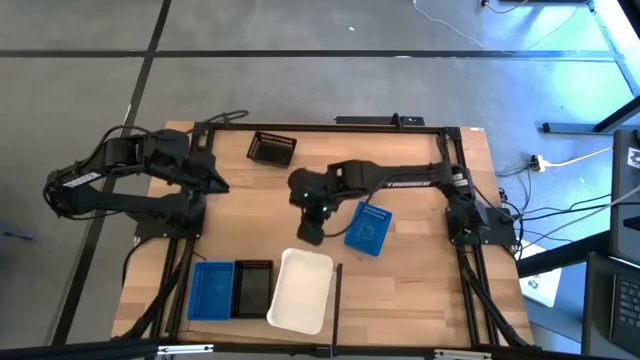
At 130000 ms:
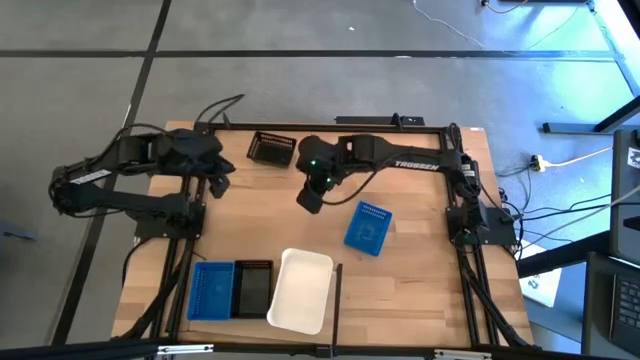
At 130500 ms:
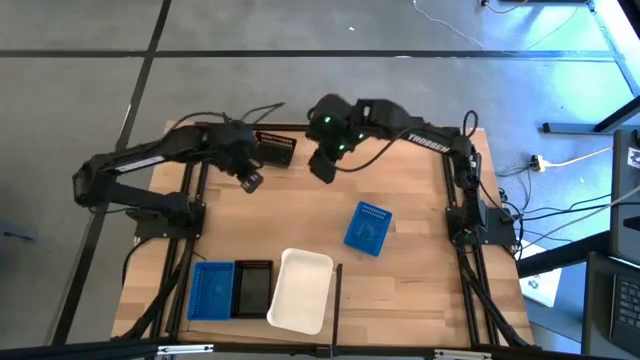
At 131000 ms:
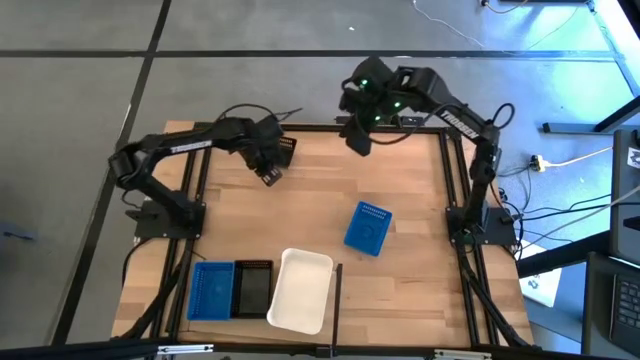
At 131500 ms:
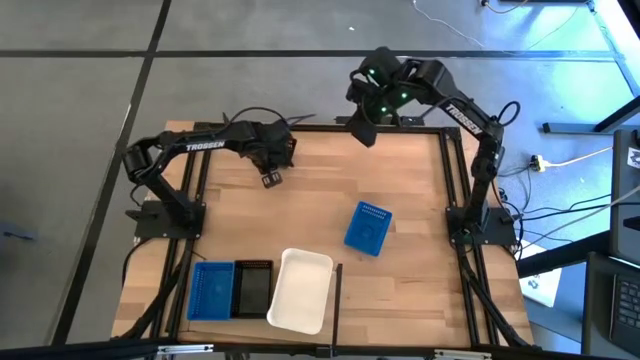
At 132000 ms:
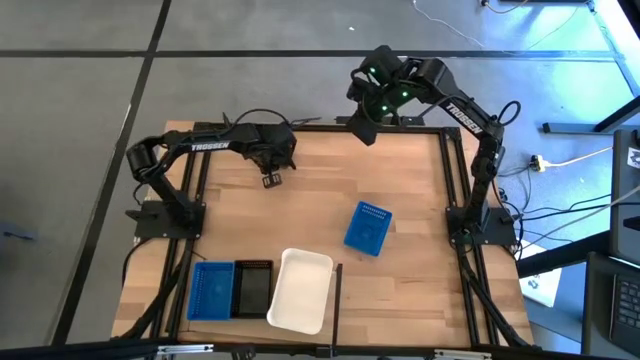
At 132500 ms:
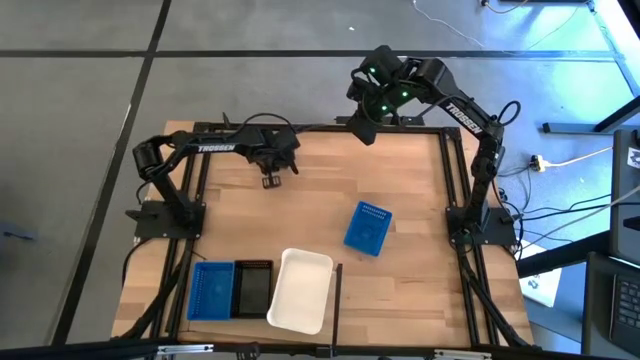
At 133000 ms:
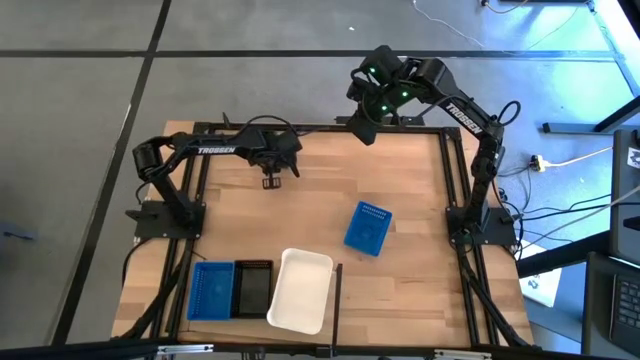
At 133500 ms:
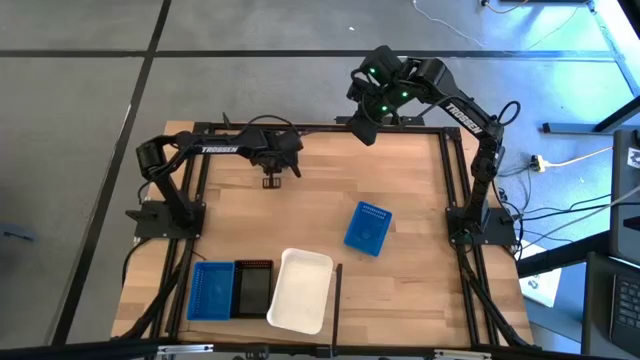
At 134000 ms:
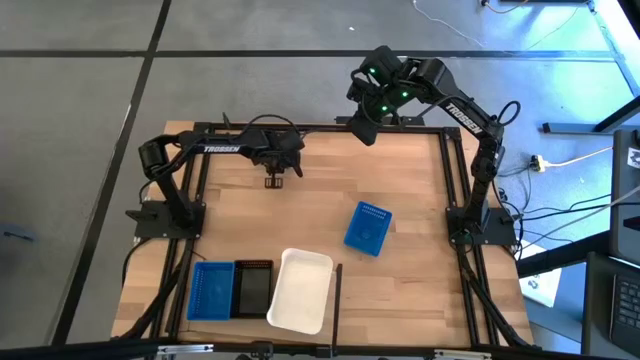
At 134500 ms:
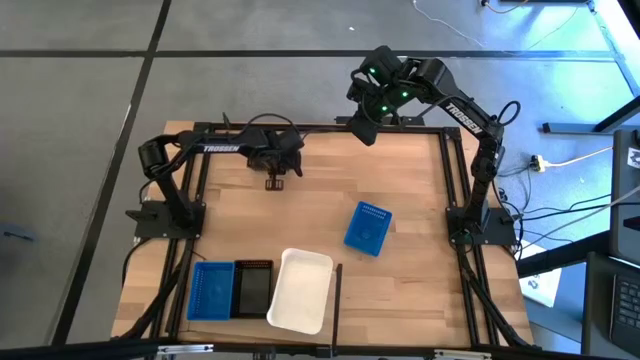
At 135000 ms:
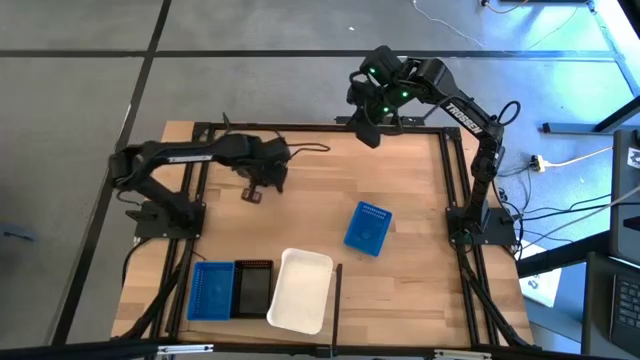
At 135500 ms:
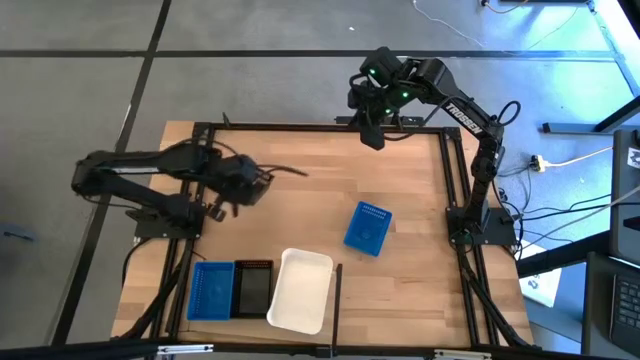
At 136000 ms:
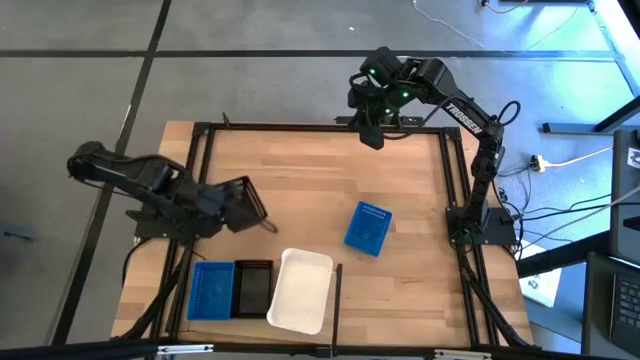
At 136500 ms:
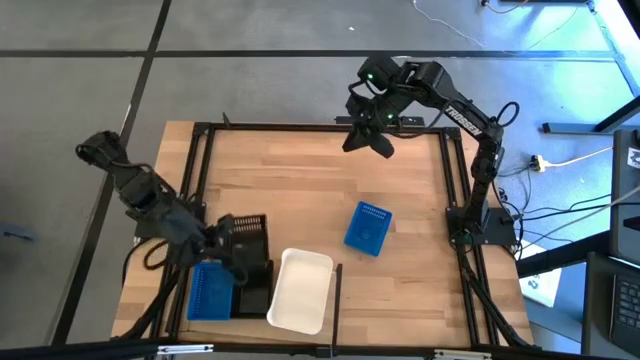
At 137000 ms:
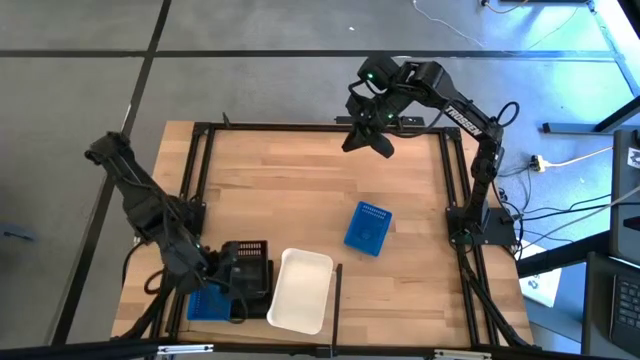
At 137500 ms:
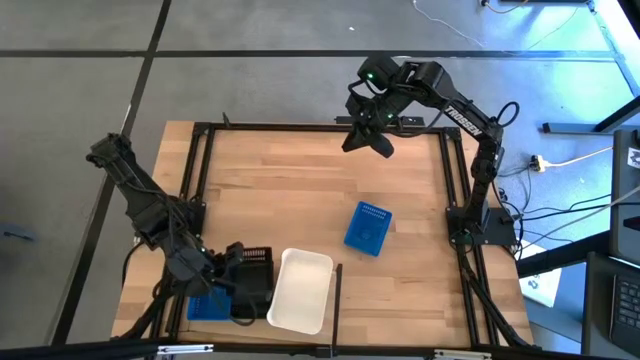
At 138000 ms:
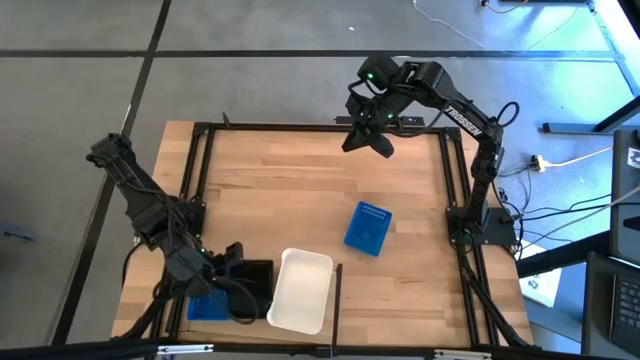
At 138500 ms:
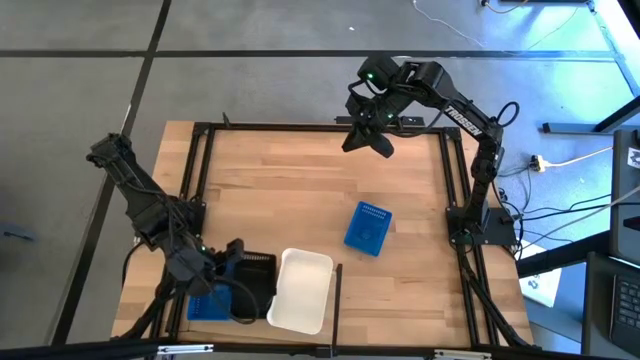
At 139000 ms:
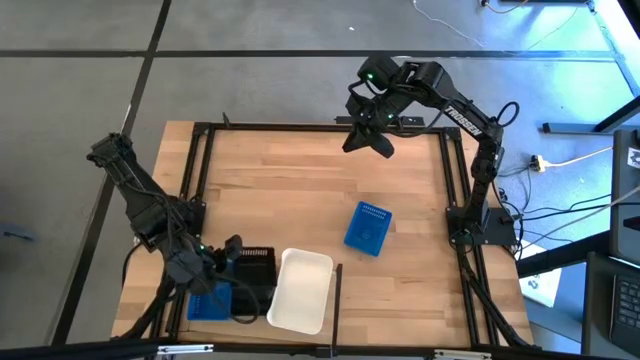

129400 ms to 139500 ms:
Task: Stack baskets on shelf by color
Stack the black bin on top of the black bins on the shelf

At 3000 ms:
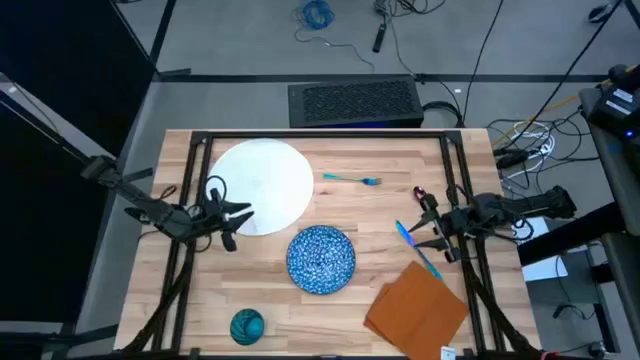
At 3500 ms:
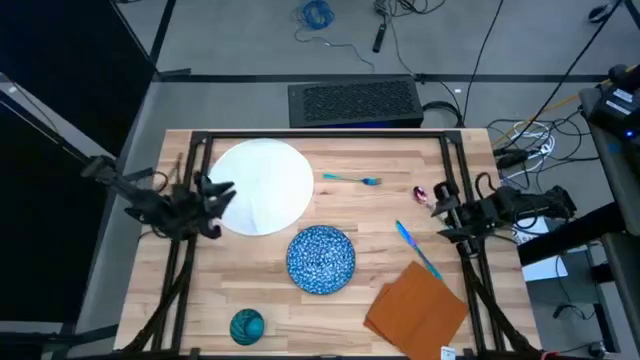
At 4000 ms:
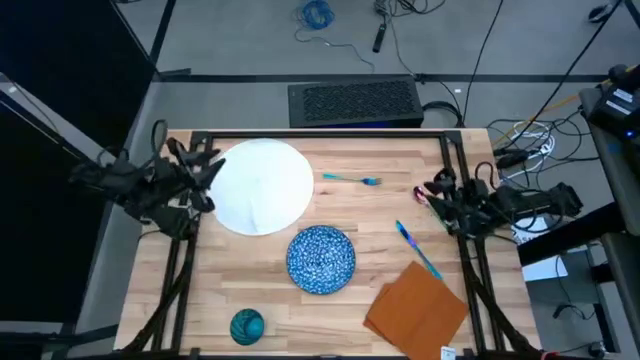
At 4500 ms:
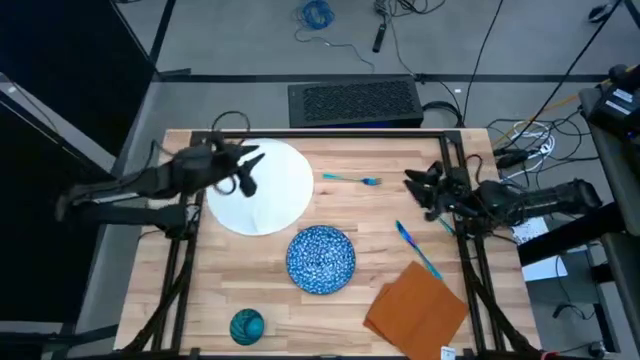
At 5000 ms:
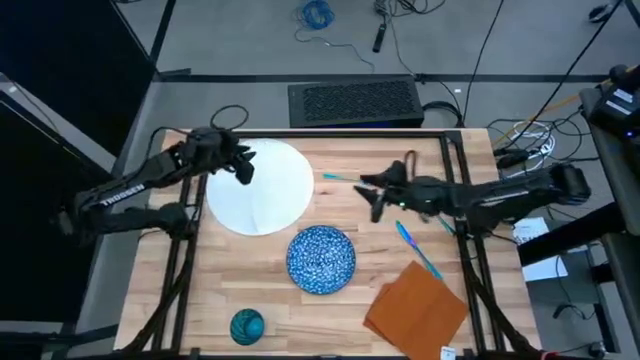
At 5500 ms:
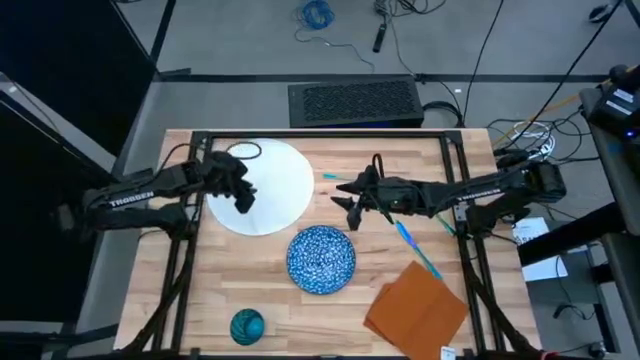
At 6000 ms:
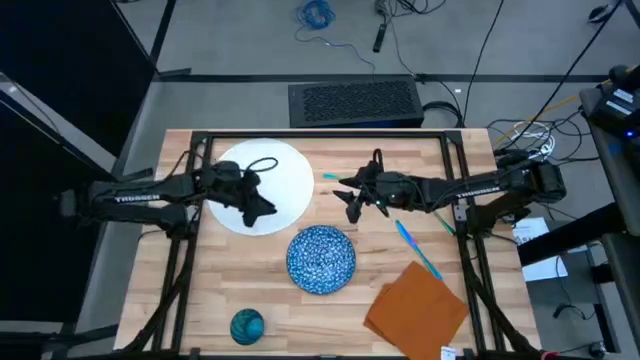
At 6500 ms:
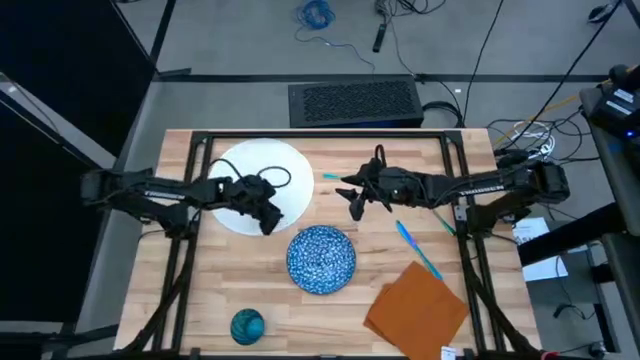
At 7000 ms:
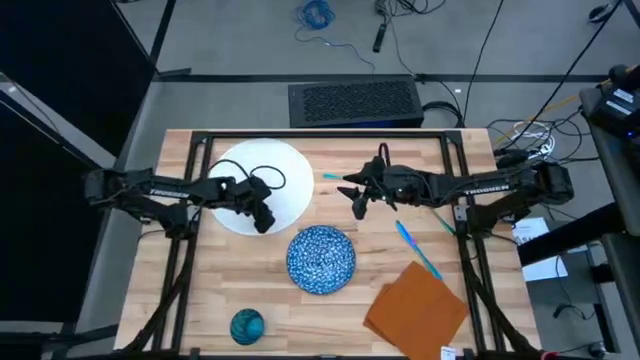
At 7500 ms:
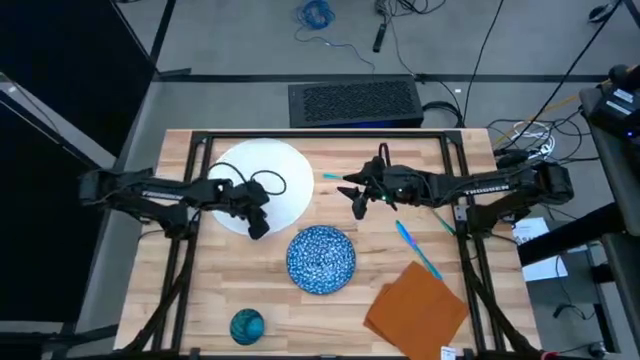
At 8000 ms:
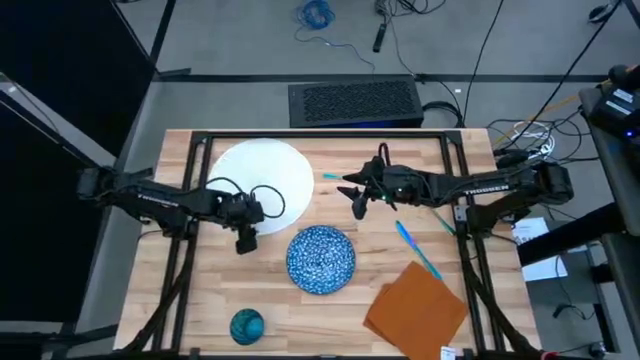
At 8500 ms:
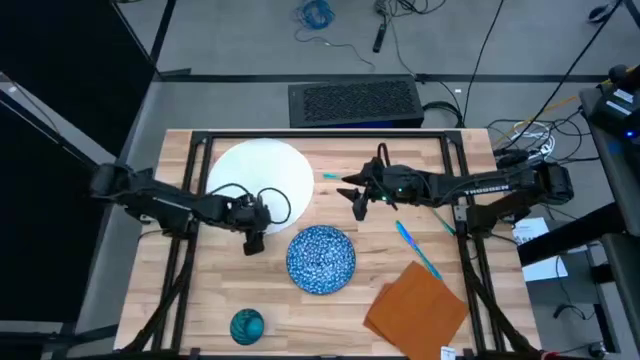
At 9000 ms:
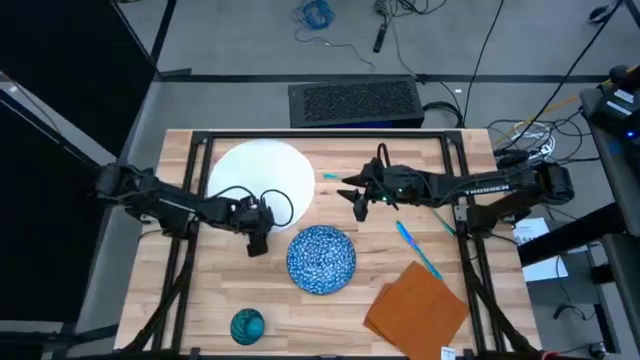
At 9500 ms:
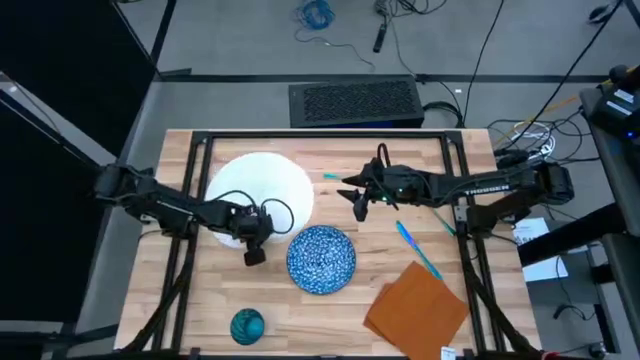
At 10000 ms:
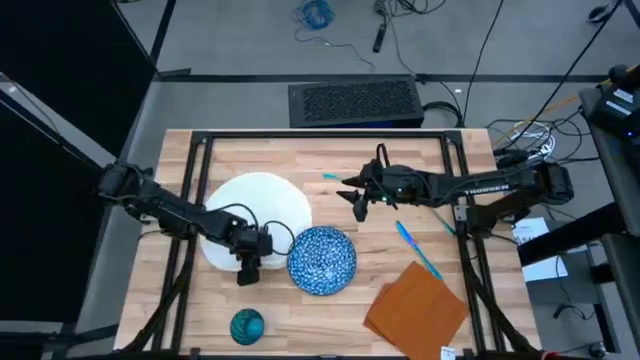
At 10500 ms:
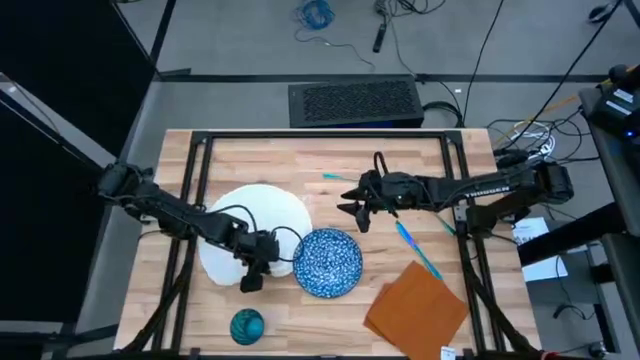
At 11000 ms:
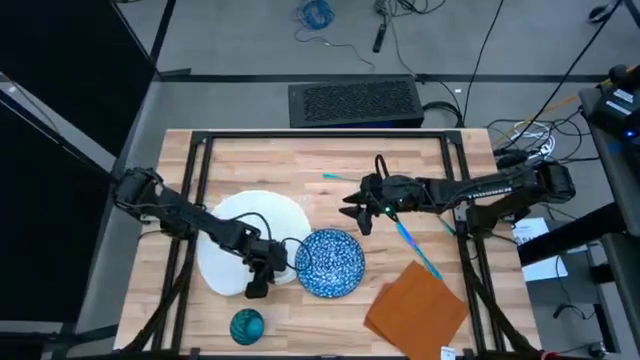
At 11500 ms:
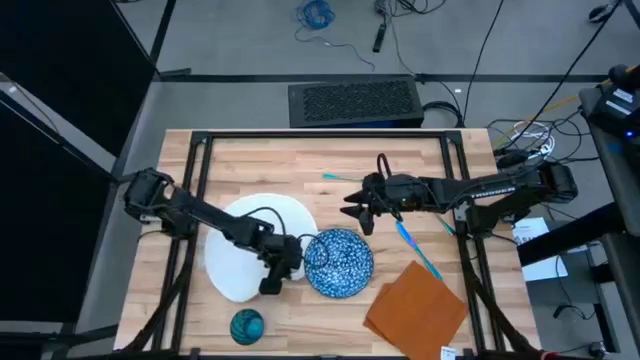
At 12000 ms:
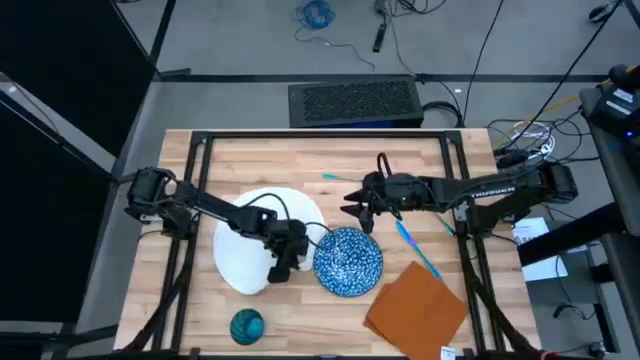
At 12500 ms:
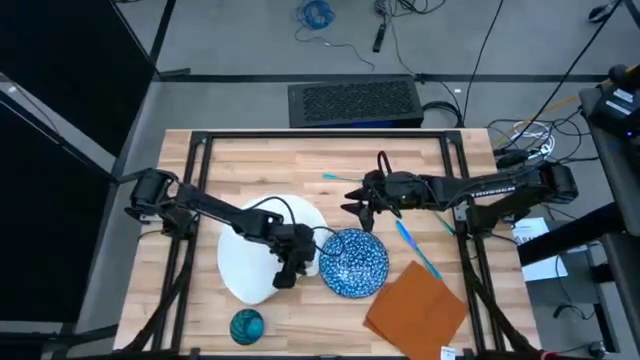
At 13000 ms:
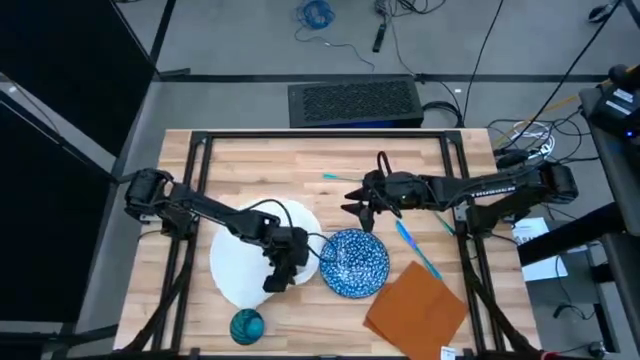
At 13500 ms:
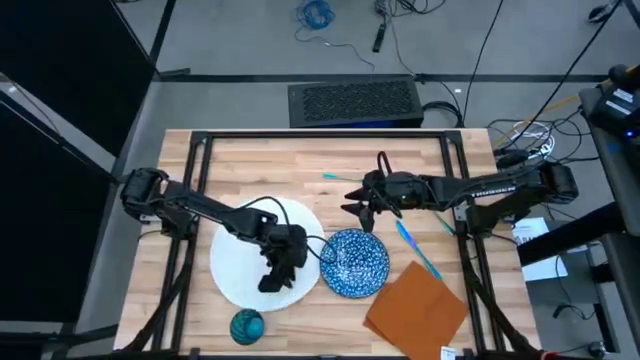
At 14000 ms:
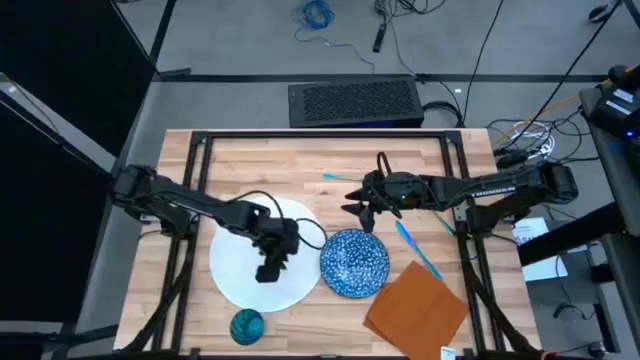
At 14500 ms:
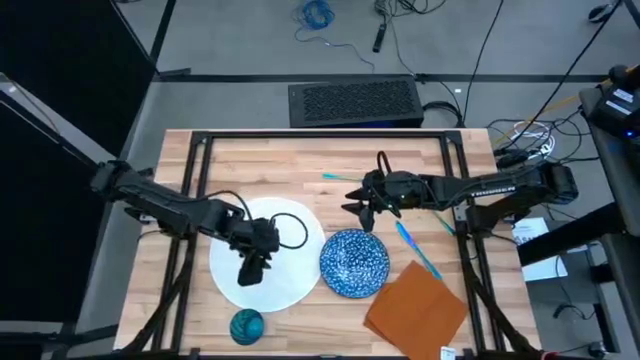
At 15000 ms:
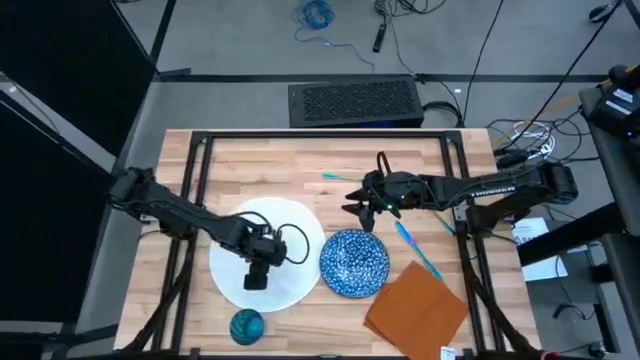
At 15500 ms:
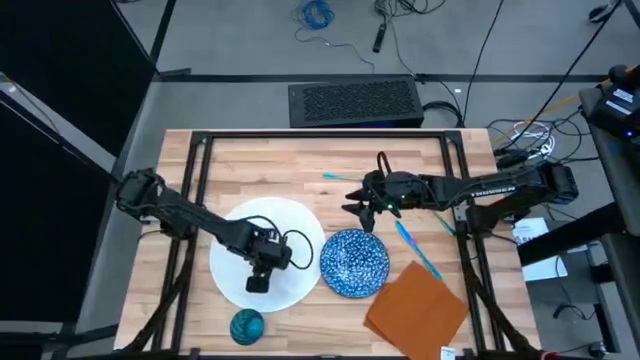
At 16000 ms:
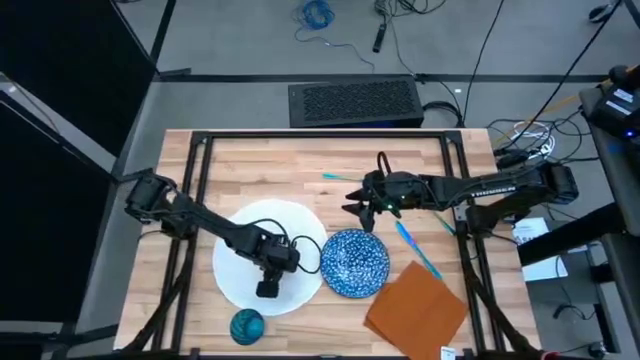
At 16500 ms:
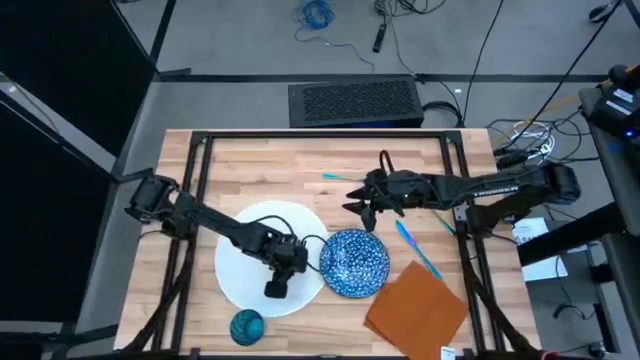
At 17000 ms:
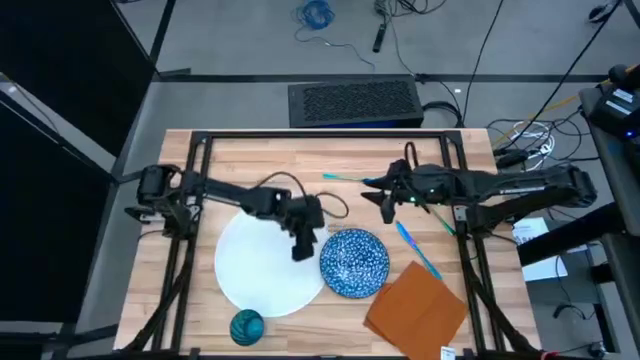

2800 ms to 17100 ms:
Task: Set table place
Move the white tablemat to the center of the table
